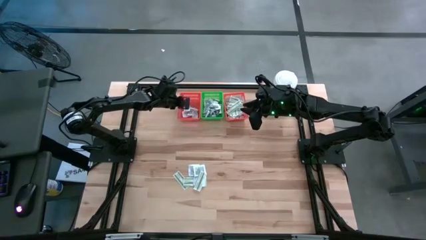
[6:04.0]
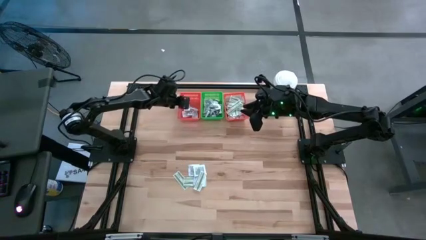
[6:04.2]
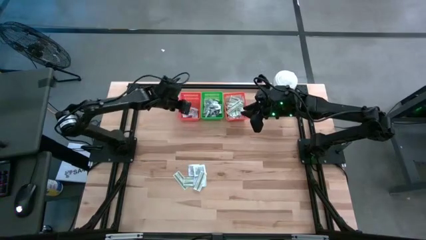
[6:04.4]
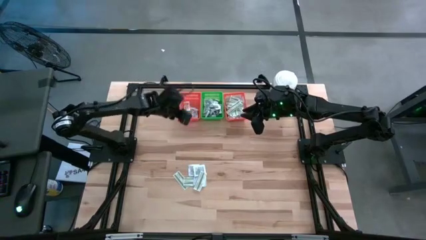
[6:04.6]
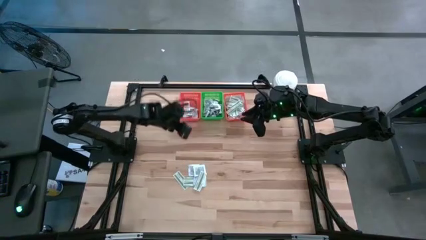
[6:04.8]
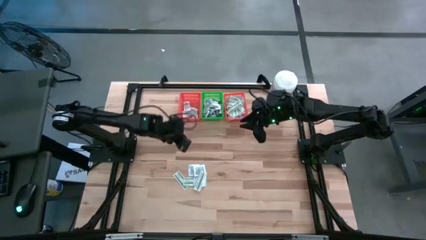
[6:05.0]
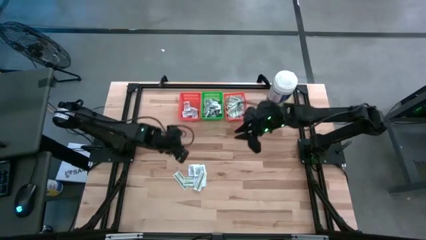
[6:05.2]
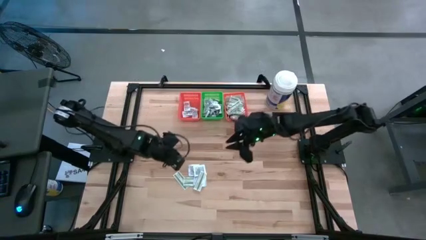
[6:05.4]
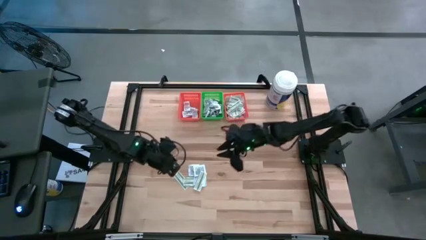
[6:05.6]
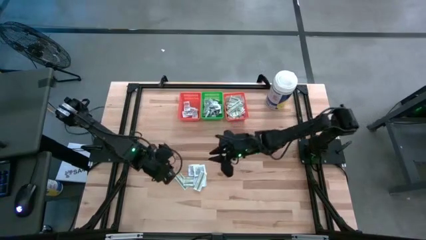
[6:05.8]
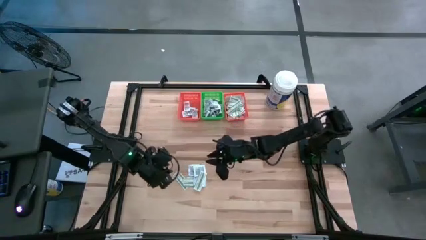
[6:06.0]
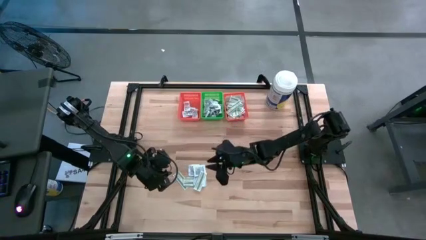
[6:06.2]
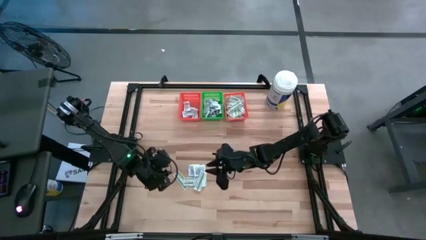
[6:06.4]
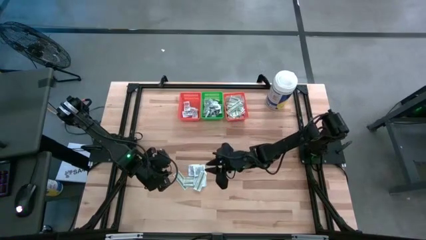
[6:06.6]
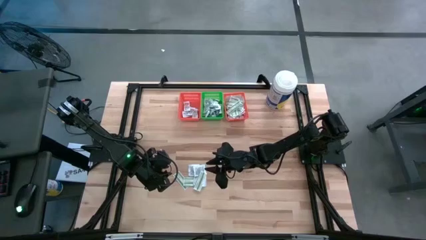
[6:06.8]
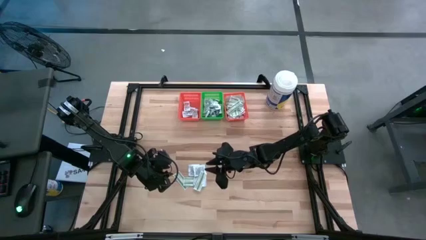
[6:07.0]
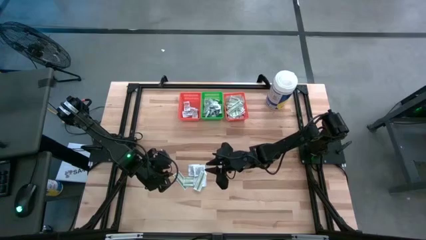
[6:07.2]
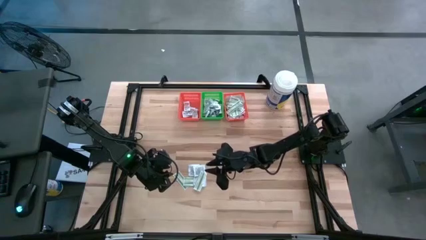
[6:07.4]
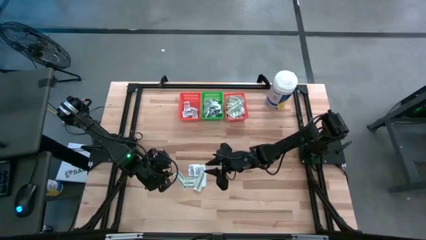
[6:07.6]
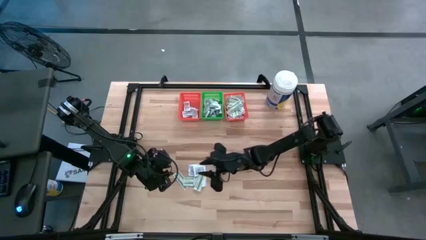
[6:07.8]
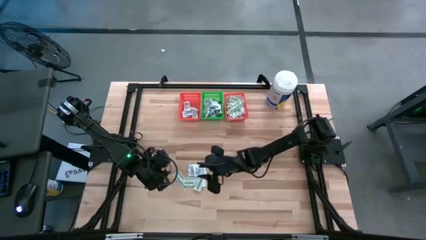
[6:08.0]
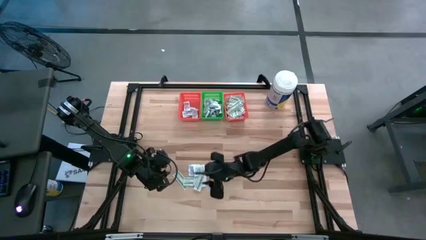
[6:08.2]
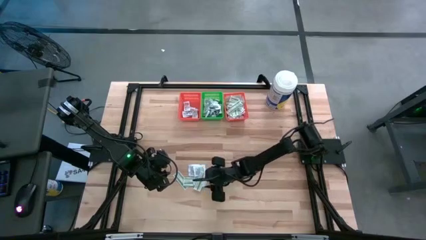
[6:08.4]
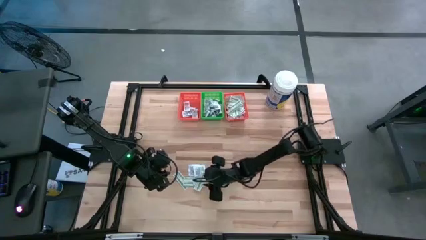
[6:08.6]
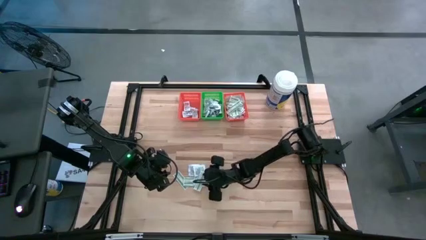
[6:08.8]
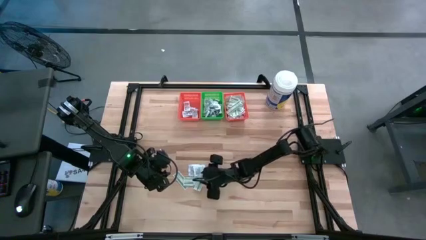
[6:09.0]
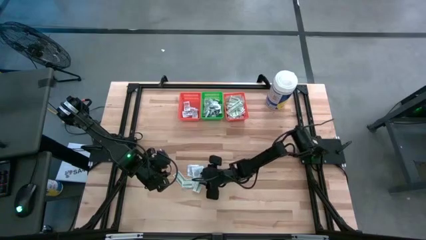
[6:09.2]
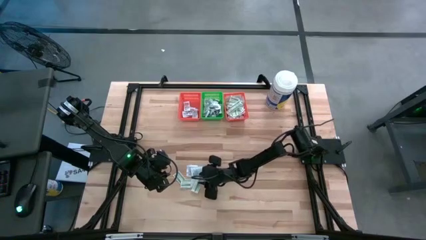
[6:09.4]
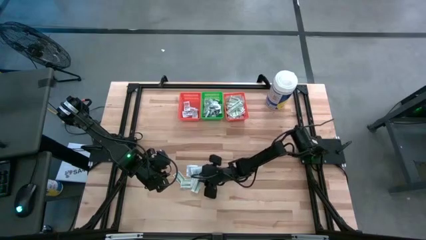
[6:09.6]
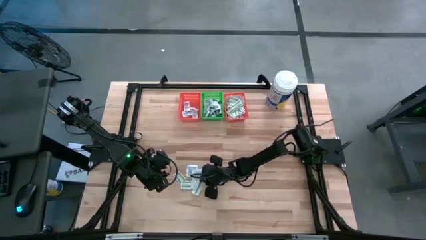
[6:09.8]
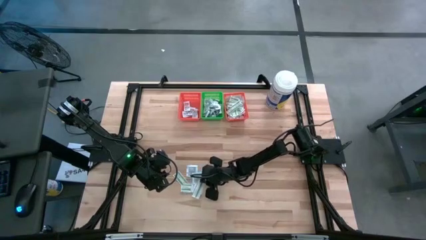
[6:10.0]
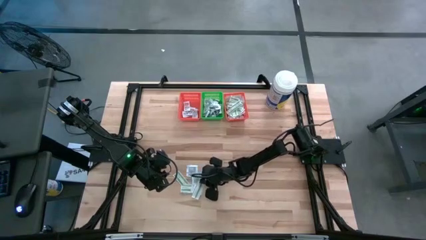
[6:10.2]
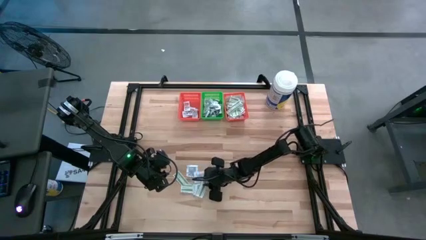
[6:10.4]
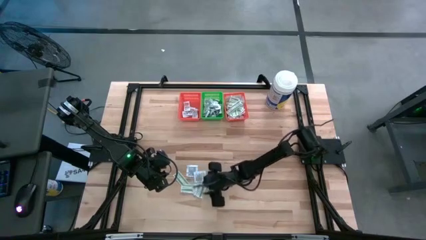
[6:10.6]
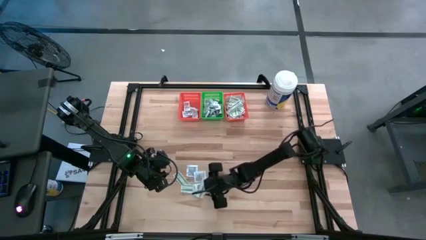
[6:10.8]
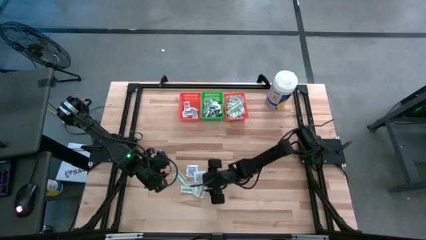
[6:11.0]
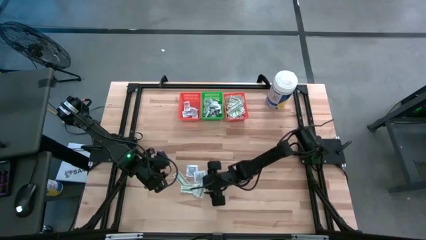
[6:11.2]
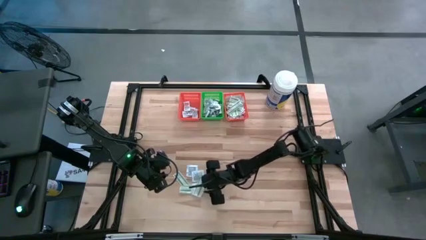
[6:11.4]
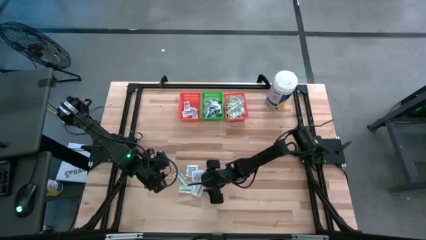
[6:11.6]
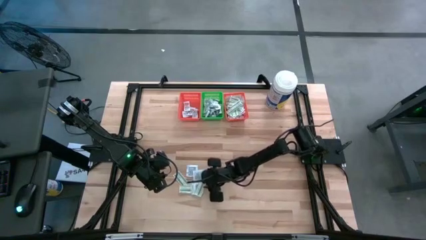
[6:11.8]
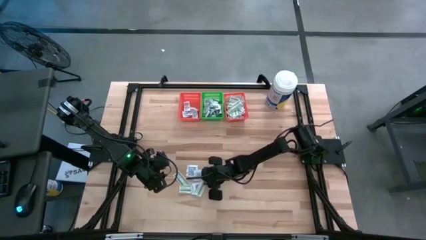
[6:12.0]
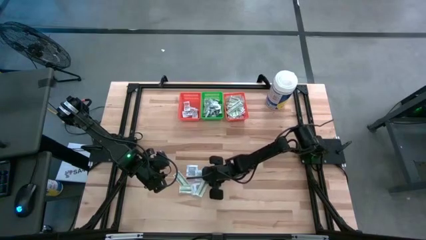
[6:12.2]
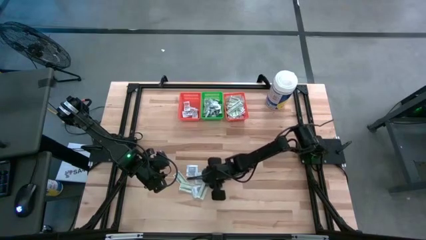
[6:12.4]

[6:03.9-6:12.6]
Task: Pick & Place First Aid Supplies
Put the bandage pack into the right orange bin

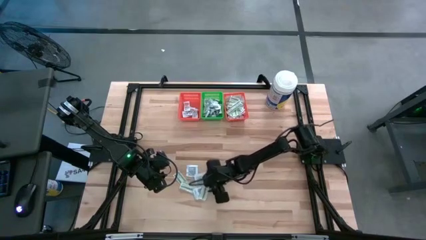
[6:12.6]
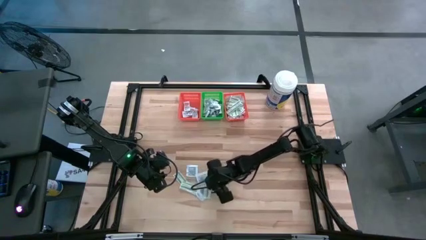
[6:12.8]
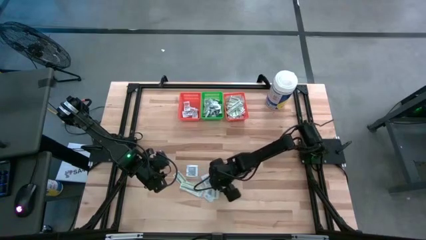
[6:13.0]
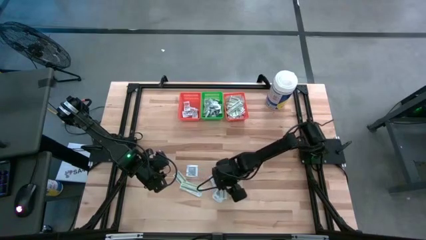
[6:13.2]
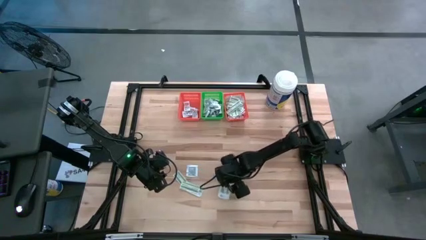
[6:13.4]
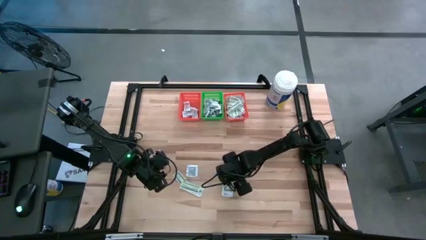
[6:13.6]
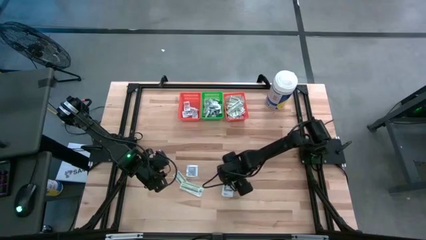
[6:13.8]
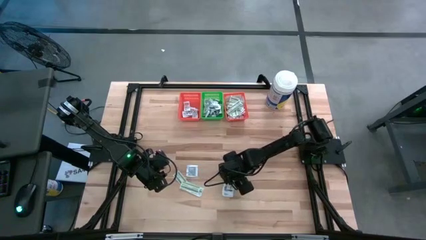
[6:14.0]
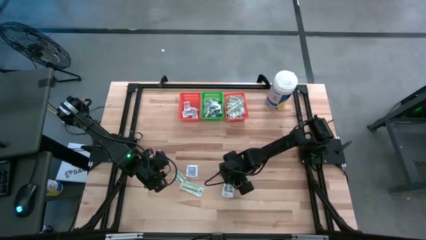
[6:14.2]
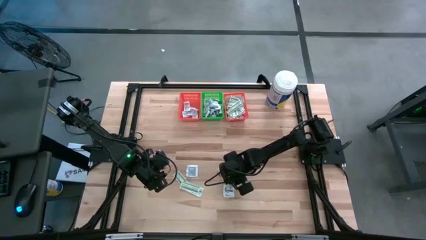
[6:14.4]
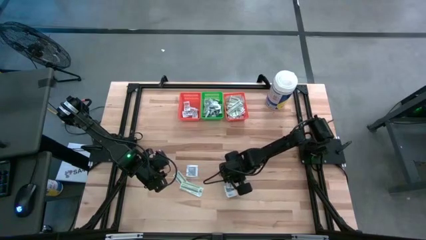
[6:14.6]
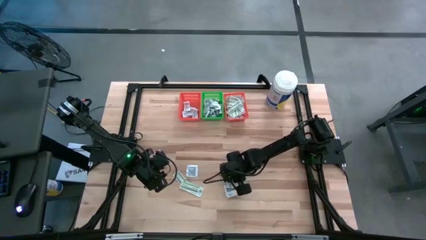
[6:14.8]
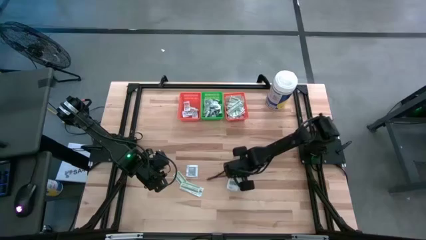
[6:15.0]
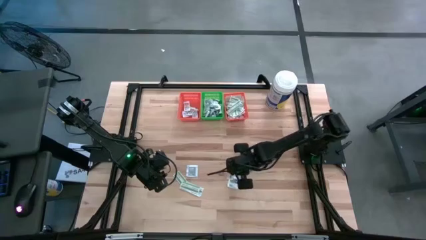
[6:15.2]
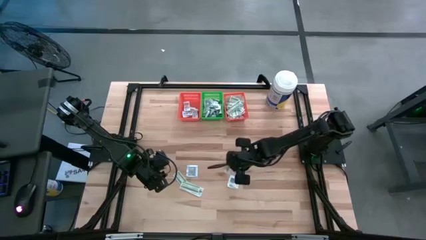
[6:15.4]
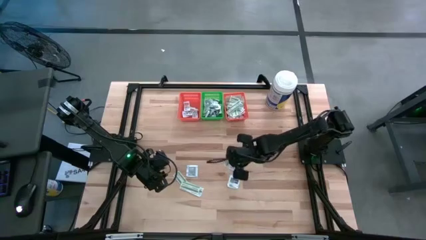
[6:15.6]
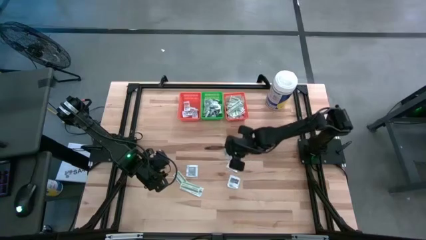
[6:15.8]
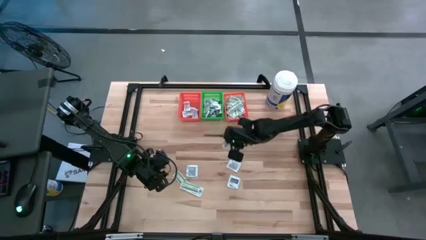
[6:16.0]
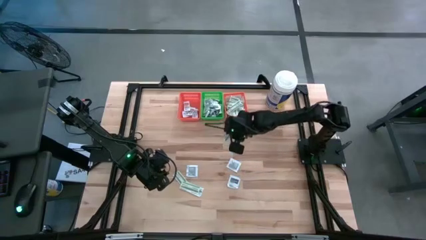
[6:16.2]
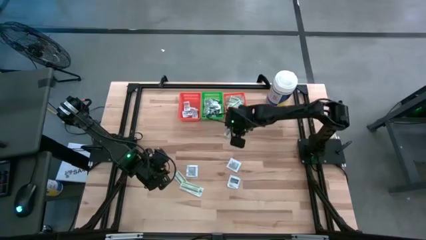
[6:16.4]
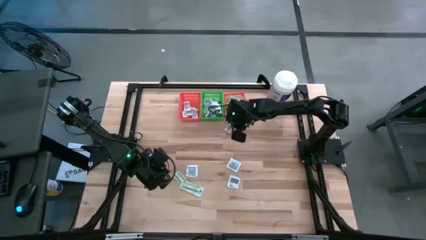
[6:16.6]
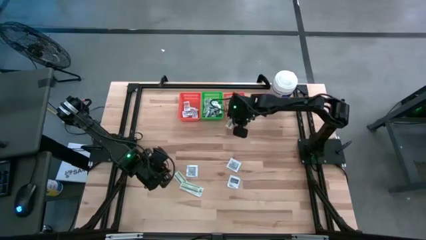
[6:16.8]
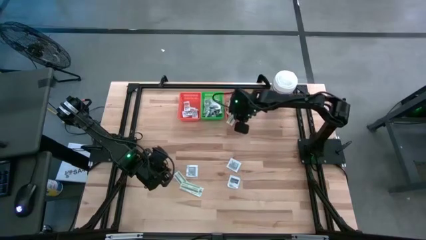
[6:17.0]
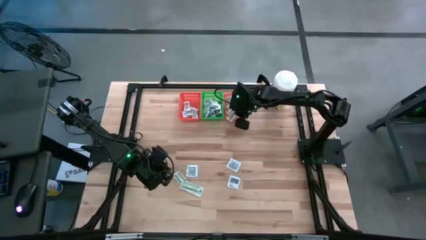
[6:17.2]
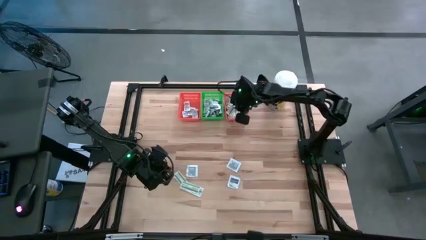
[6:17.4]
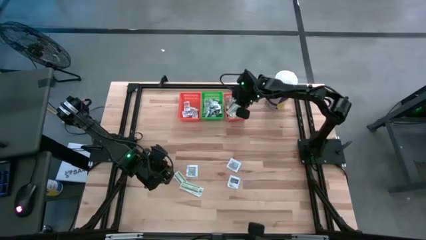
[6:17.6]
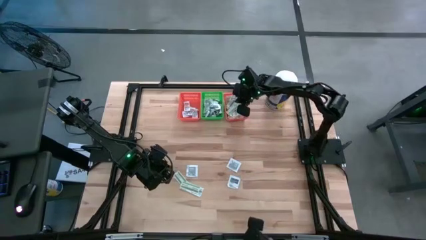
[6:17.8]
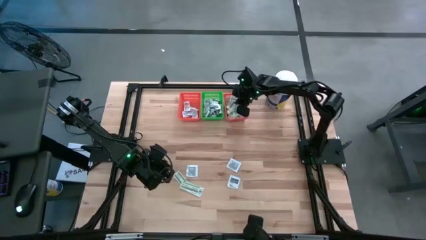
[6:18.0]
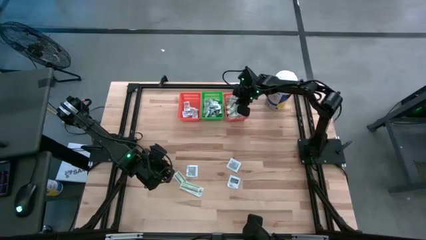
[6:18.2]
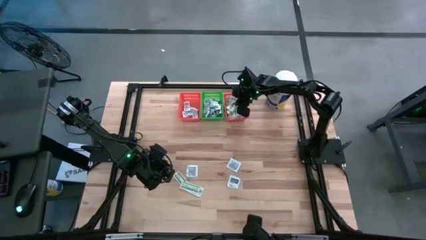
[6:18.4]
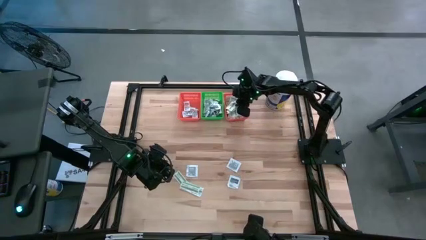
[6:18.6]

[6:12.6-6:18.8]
Put the bandage pack into the right orange bin
